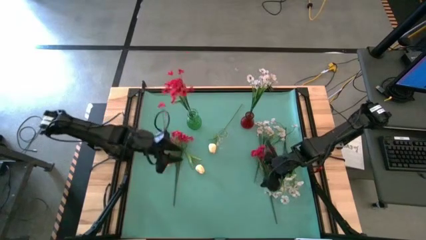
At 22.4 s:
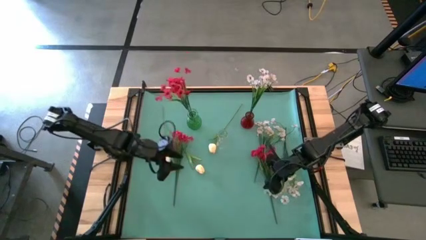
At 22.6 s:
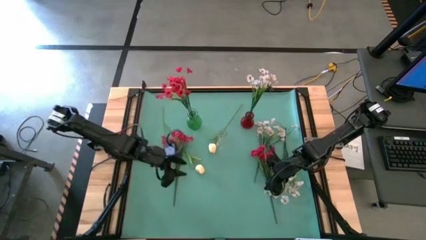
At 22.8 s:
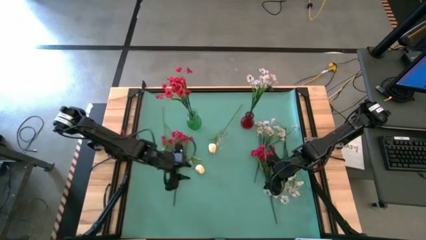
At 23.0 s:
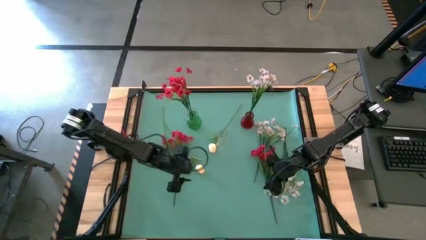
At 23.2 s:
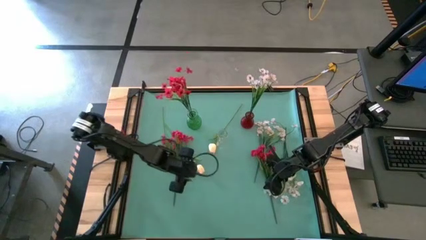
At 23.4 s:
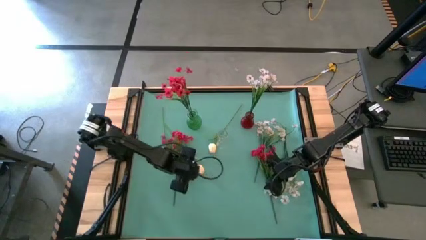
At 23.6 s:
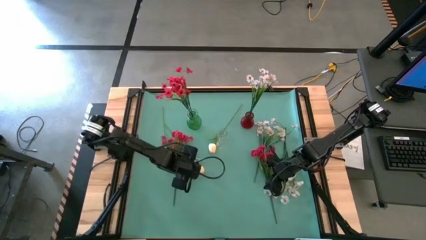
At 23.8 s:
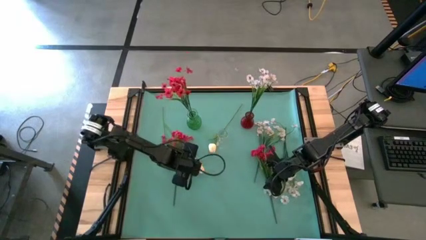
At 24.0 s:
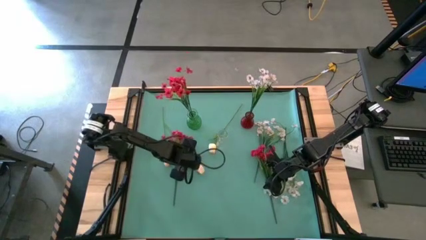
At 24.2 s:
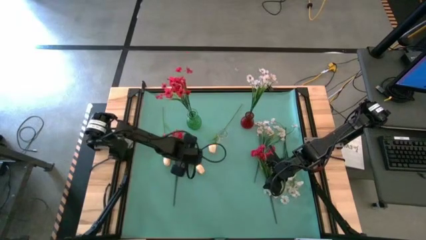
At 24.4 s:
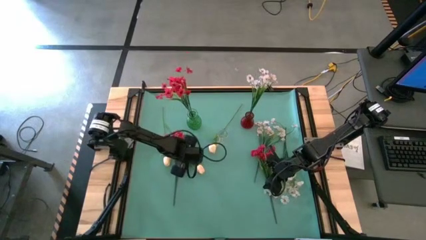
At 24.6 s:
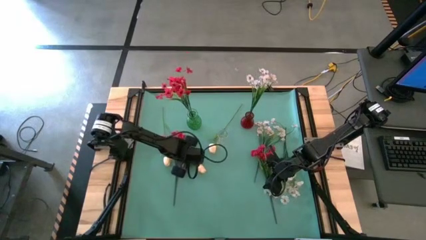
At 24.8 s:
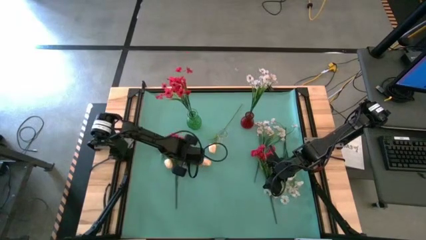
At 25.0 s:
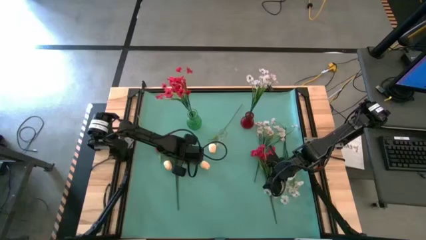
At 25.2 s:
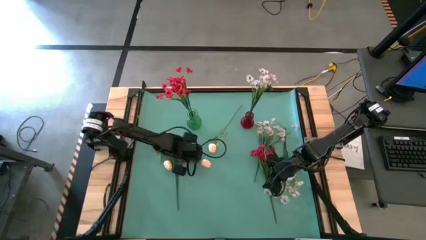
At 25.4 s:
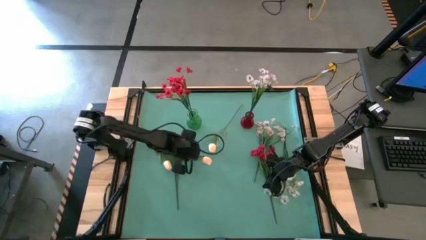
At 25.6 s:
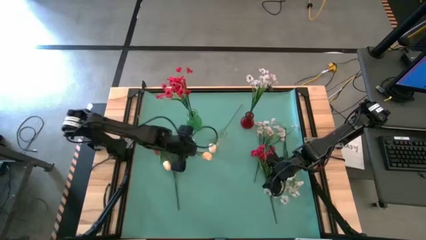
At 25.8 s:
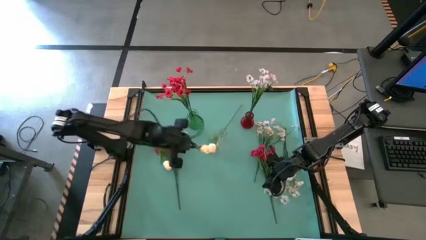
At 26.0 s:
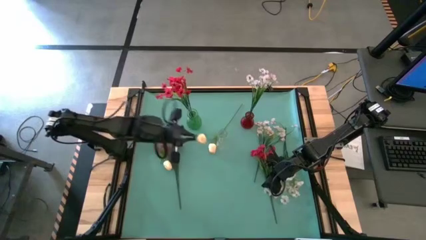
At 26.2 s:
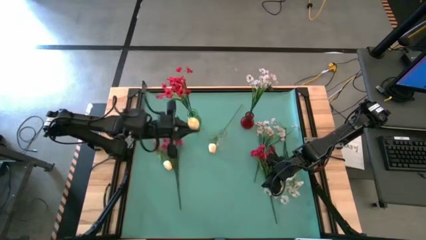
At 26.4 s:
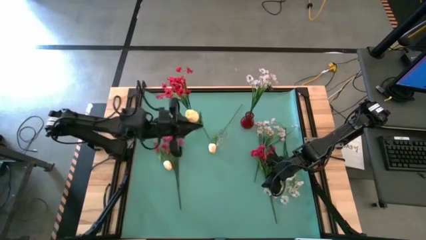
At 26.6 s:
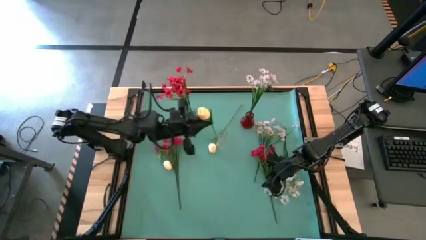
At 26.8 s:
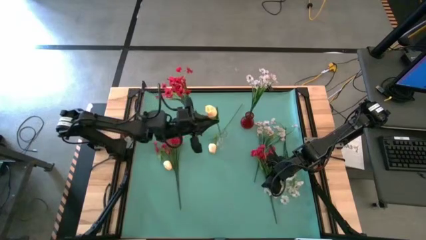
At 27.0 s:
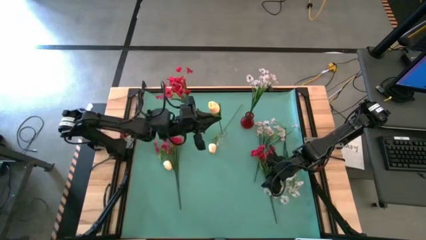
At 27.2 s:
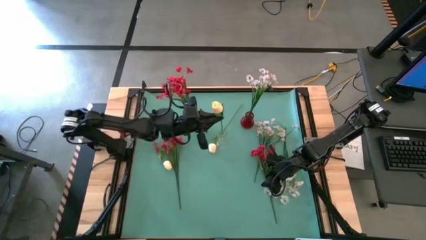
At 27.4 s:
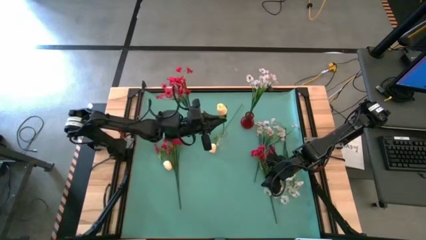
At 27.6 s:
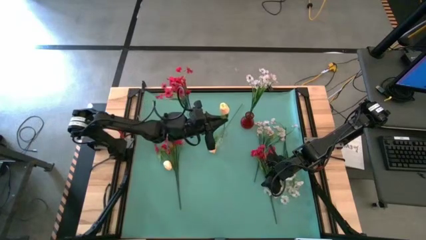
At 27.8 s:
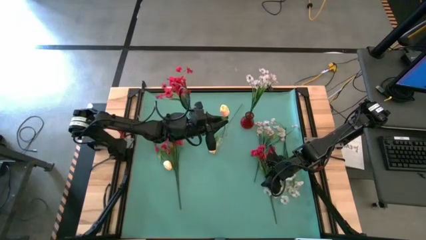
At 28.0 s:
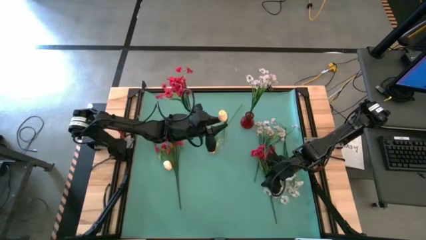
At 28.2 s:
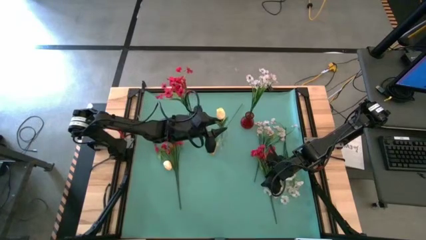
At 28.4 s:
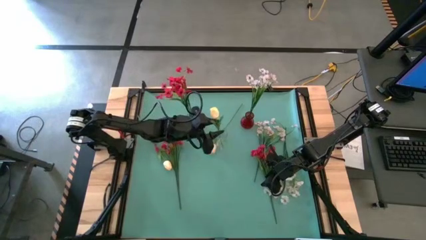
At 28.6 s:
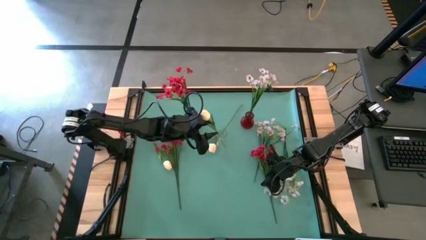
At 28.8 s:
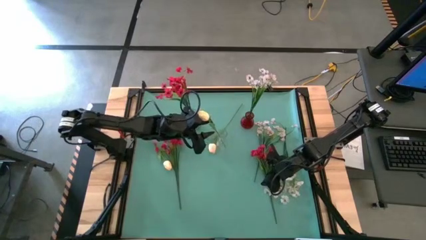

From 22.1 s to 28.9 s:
Task: Sort flowers into vase by color
Put the center yellow flower into the transparent vase

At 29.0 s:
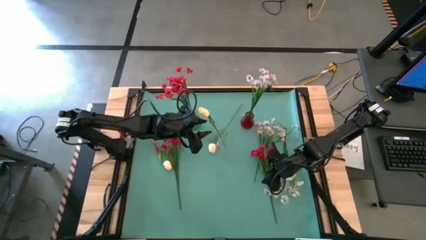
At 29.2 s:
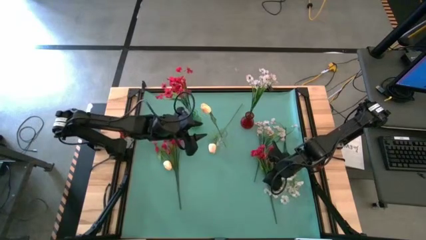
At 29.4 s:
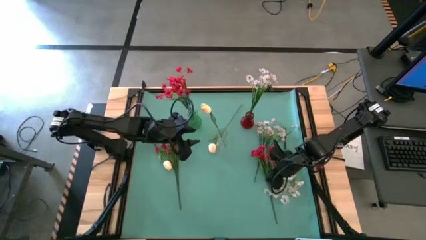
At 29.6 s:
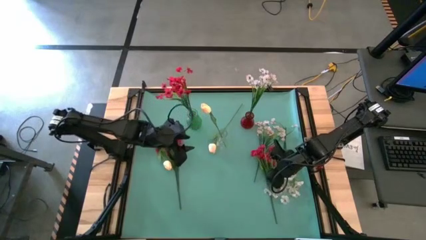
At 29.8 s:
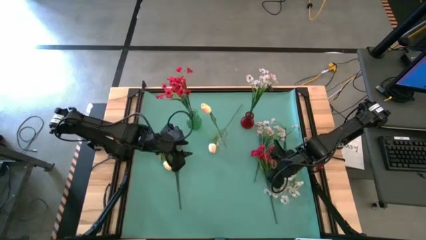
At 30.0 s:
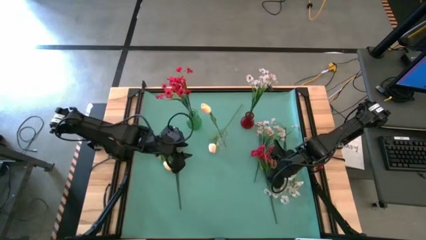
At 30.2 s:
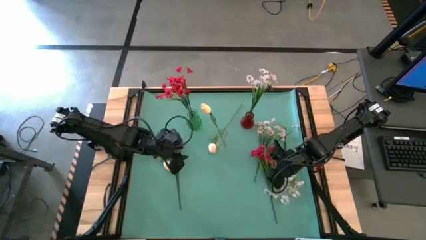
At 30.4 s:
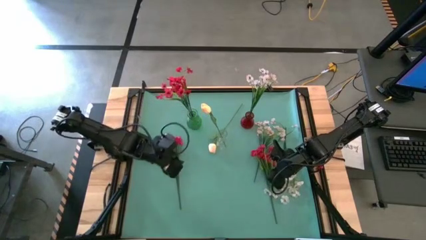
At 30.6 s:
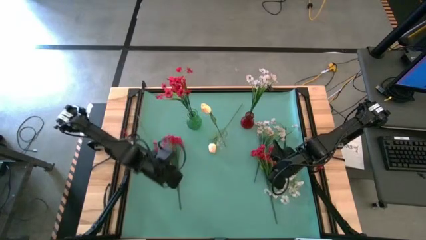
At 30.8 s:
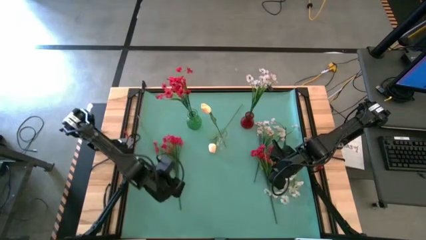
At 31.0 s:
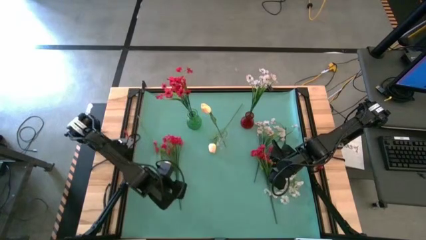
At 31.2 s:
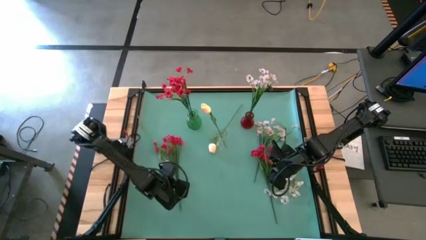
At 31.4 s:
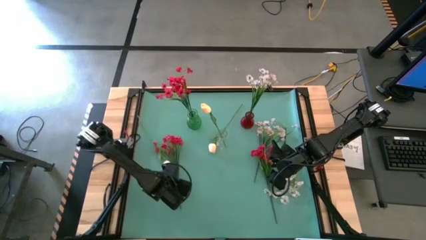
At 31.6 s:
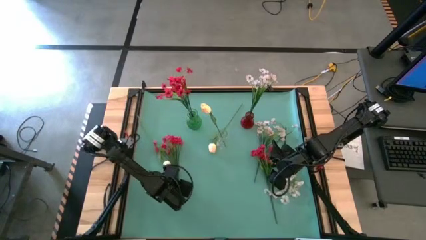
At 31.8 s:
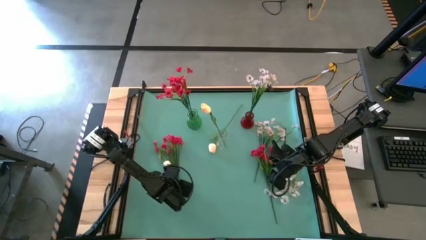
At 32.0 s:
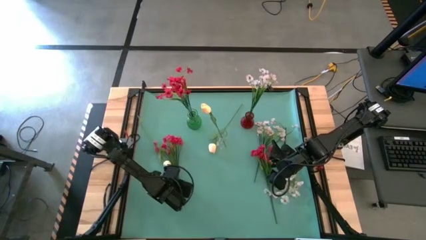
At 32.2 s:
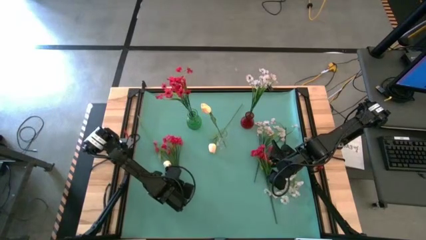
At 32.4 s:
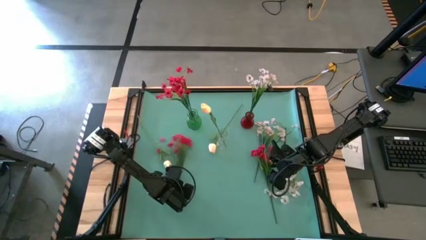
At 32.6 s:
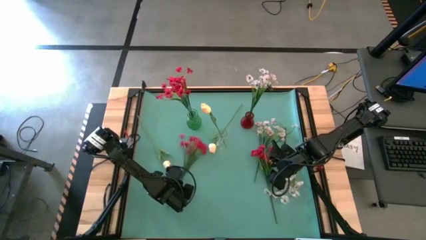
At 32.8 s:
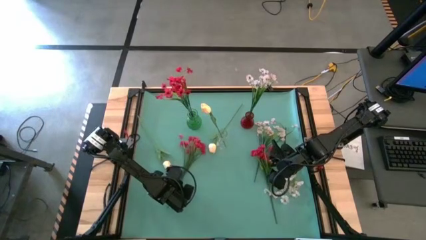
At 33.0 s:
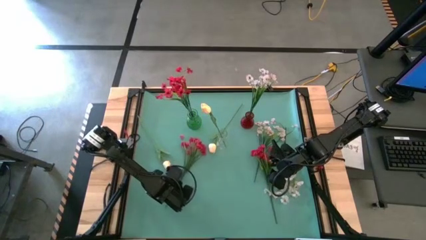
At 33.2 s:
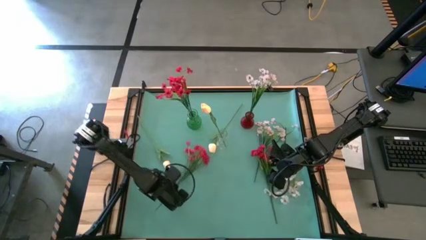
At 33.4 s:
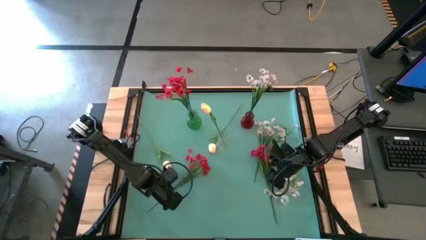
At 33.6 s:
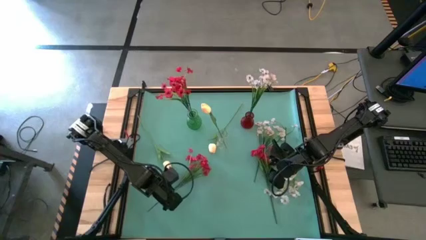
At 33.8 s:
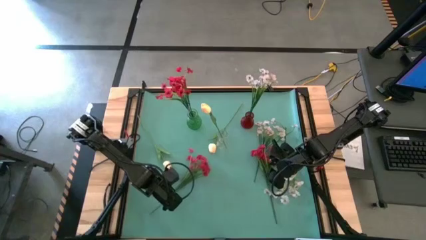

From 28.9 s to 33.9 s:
Put the left red flower into the green vase

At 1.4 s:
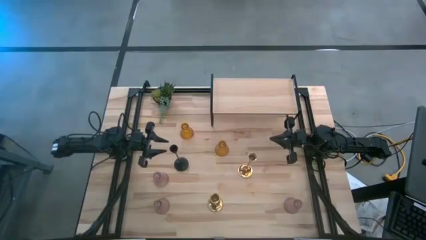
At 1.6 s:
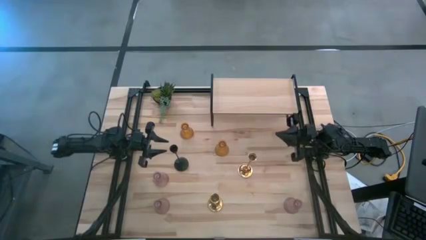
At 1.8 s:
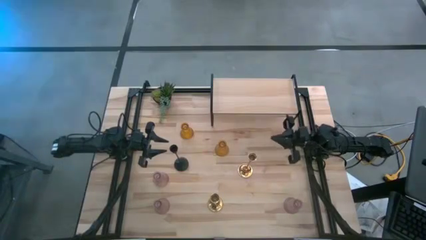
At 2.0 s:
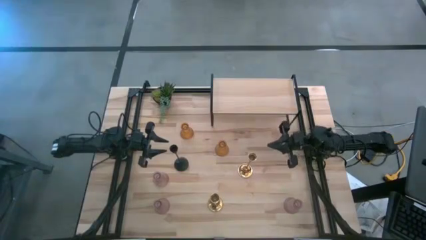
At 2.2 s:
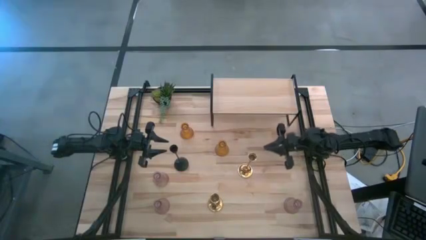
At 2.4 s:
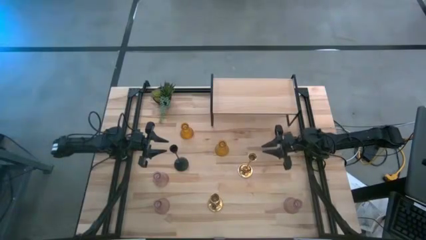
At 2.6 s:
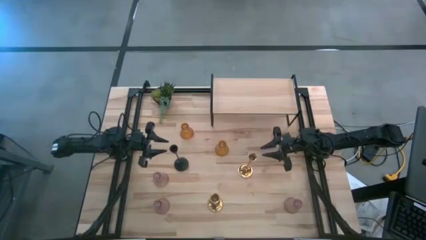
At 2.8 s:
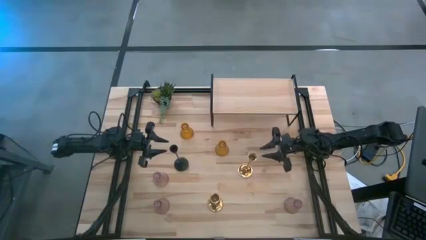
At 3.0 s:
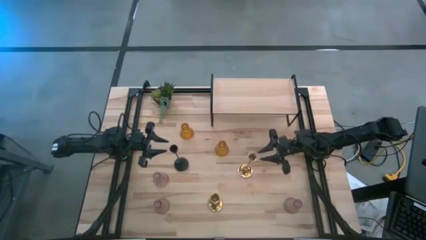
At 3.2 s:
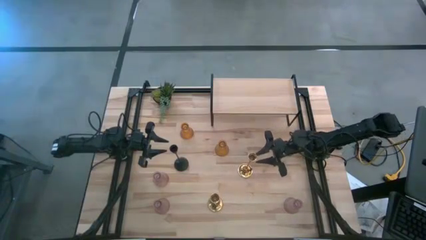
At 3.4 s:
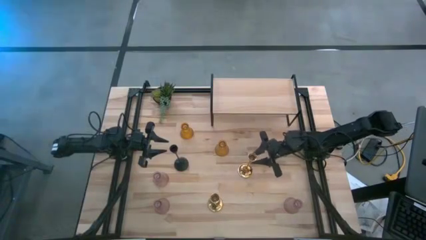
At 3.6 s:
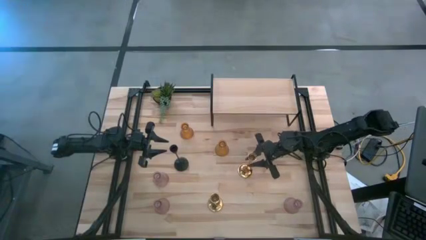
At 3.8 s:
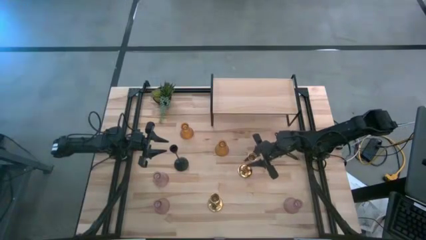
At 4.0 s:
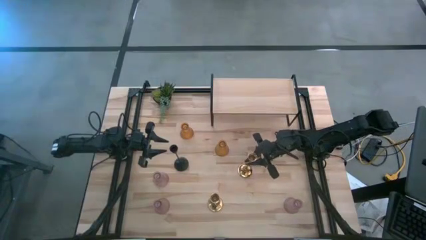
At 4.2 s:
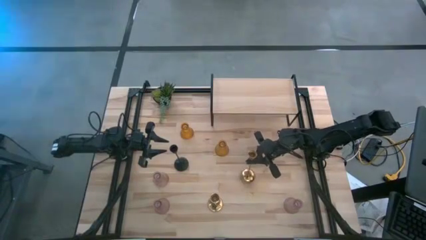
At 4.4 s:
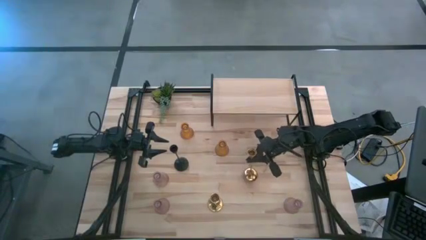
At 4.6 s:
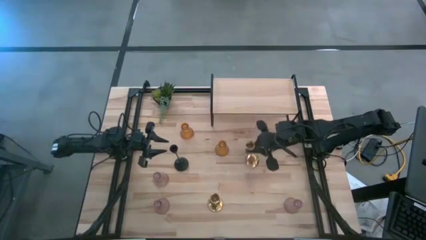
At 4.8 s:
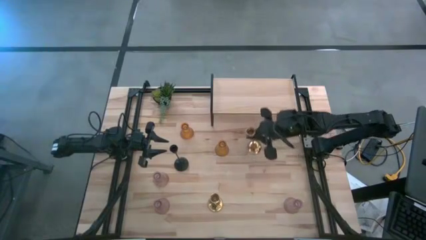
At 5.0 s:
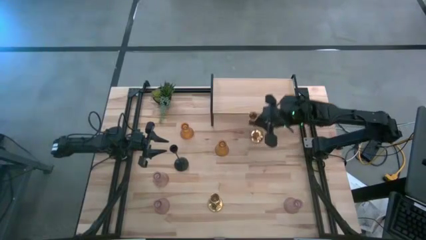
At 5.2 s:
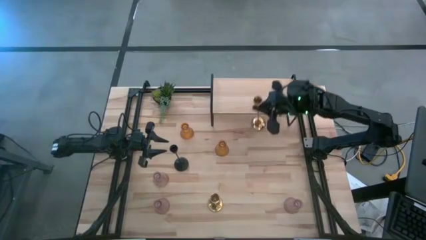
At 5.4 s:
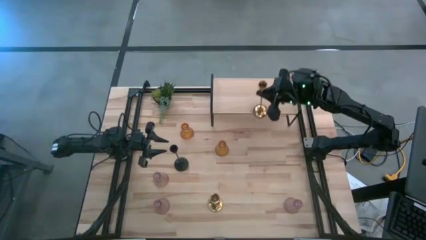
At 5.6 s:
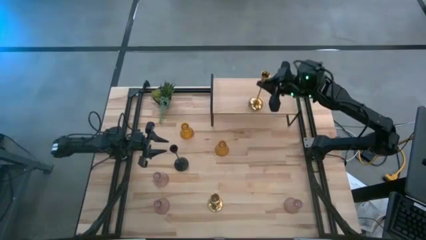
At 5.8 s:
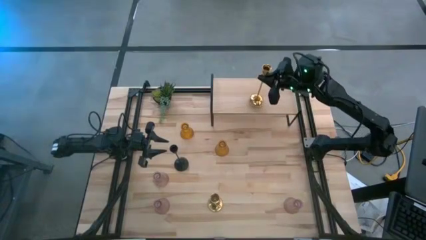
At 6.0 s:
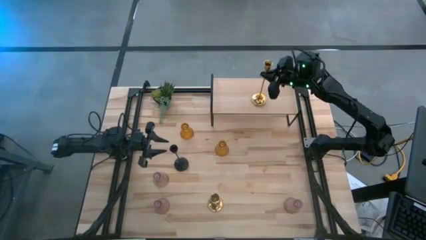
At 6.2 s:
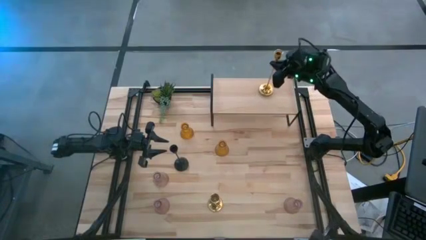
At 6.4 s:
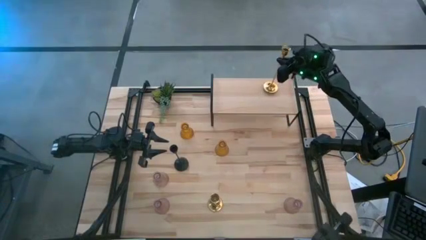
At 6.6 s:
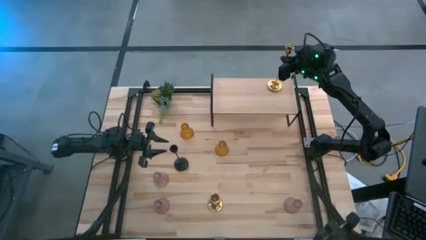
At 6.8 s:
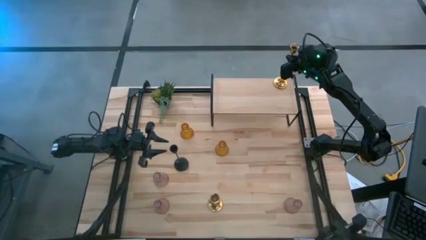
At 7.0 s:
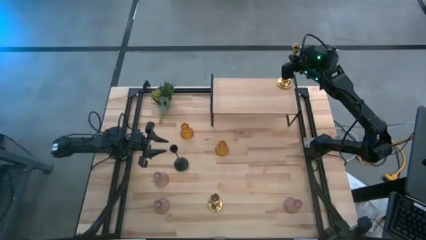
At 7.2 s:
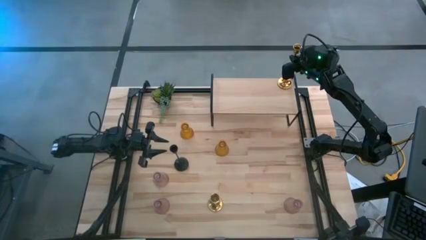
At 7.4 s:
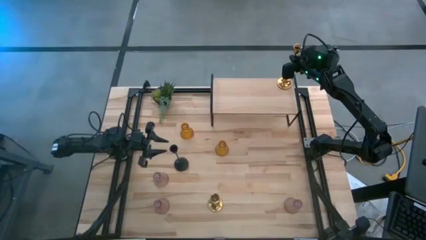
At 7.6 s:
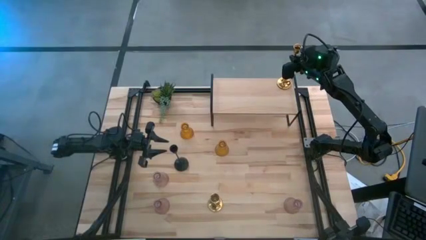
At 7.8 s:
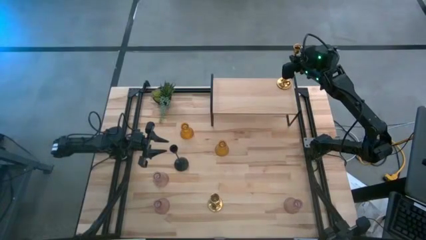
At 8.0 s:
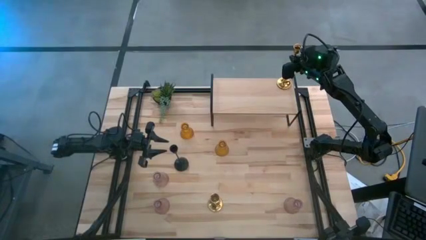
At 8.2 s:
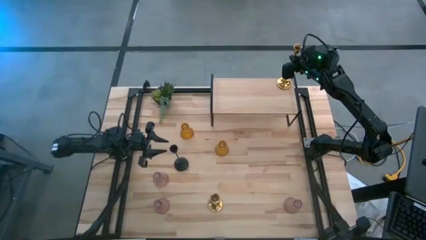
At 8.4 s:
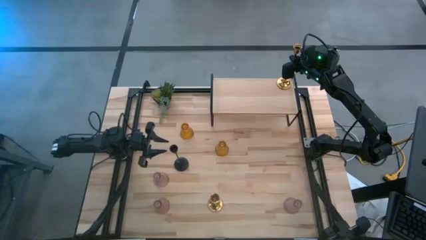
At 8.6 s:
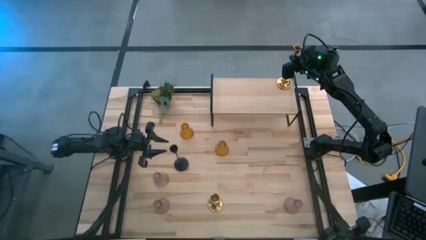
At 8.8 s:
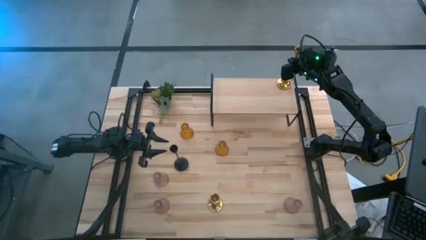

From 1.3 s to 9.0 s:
Task: Pick & Place candle stick holders
Put the top gold candle holder on the shelf
